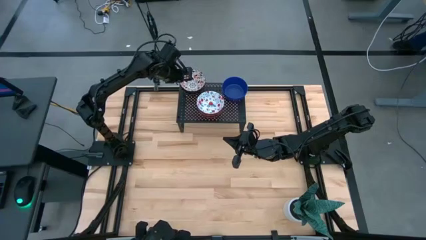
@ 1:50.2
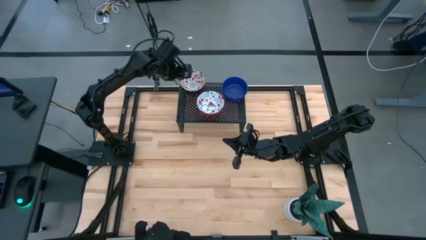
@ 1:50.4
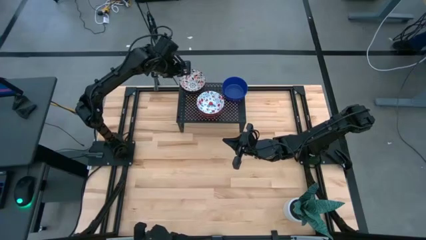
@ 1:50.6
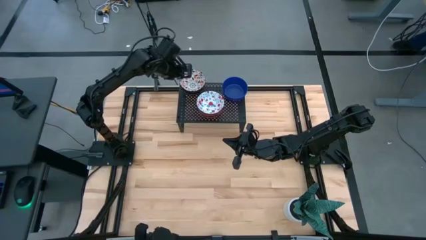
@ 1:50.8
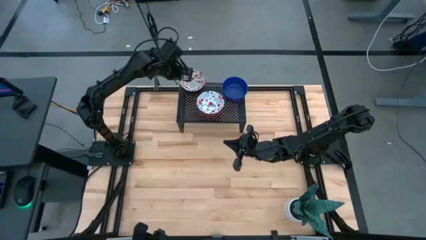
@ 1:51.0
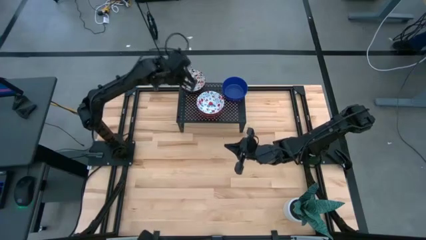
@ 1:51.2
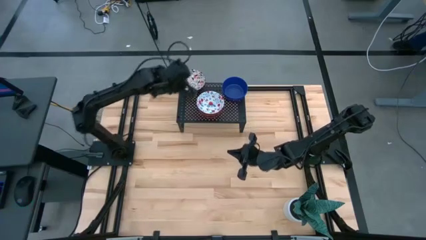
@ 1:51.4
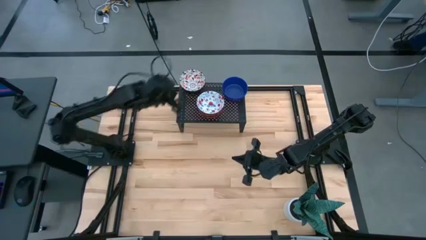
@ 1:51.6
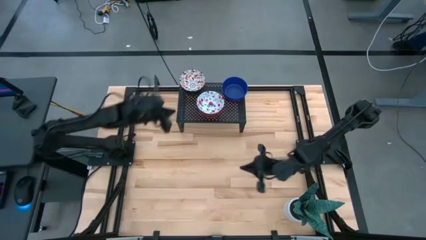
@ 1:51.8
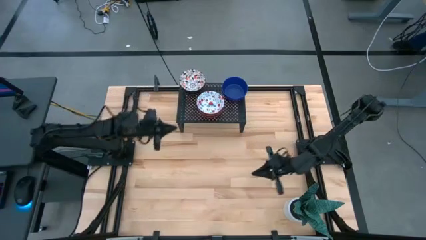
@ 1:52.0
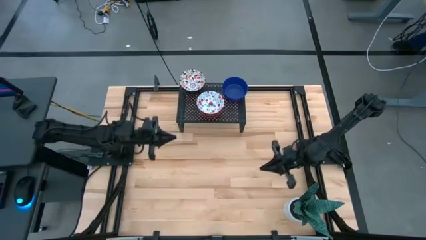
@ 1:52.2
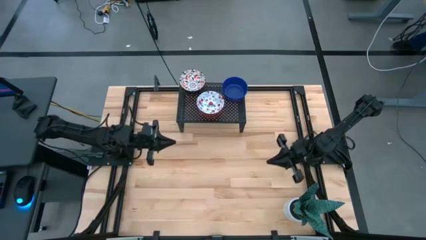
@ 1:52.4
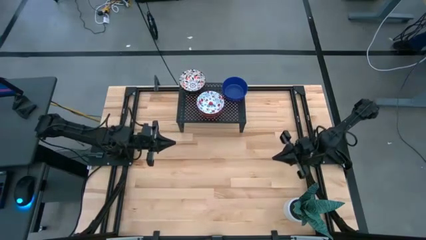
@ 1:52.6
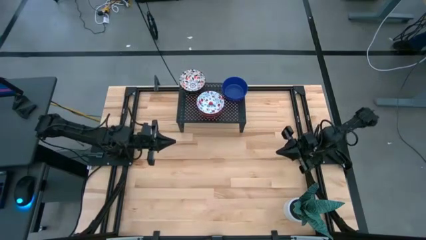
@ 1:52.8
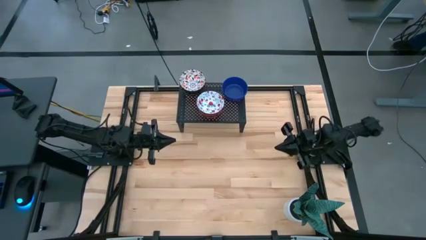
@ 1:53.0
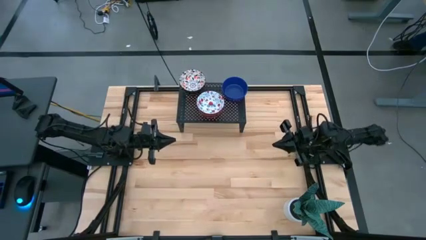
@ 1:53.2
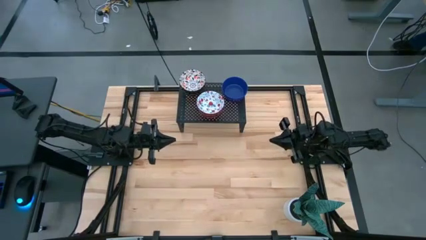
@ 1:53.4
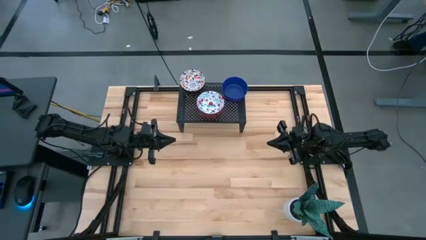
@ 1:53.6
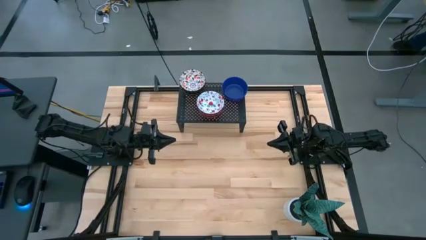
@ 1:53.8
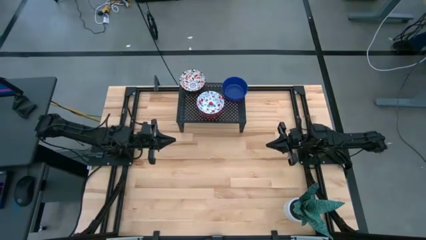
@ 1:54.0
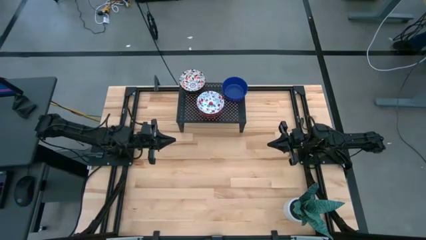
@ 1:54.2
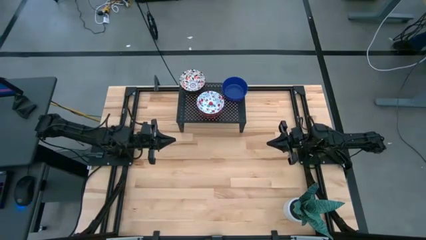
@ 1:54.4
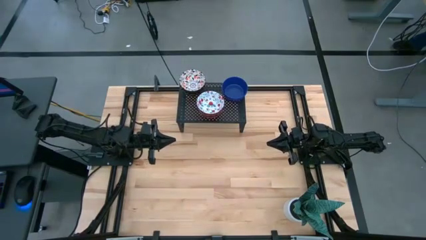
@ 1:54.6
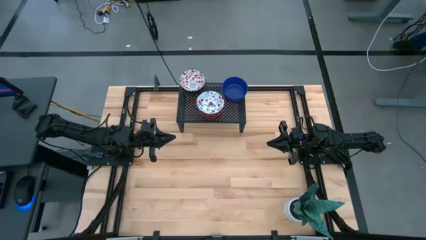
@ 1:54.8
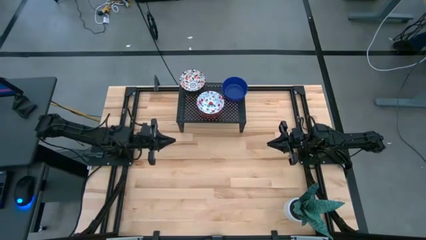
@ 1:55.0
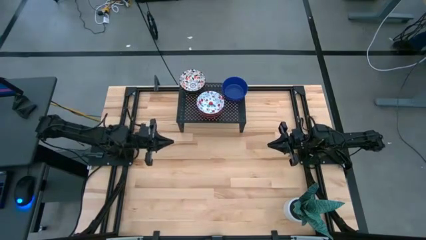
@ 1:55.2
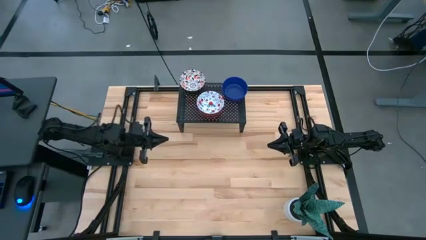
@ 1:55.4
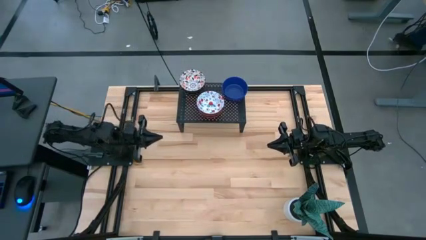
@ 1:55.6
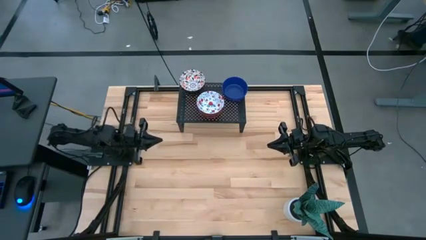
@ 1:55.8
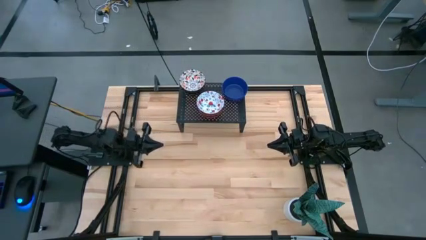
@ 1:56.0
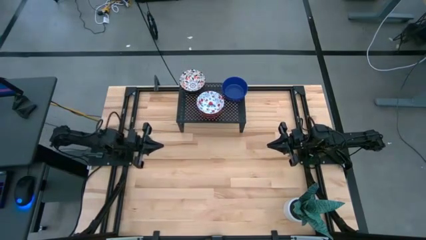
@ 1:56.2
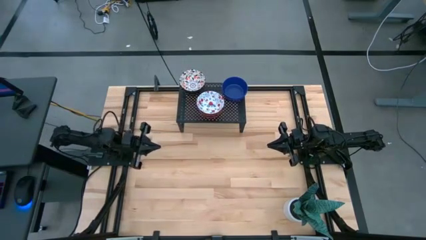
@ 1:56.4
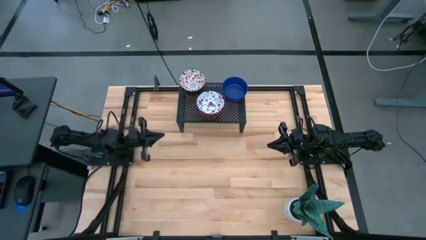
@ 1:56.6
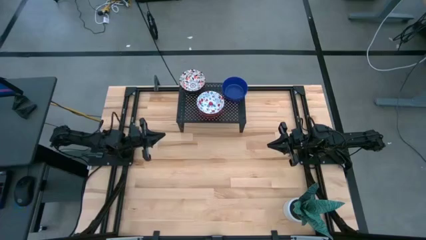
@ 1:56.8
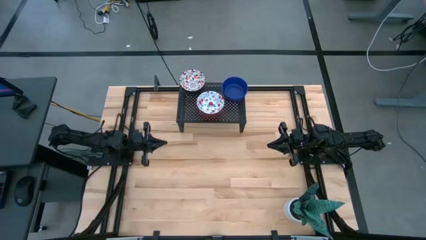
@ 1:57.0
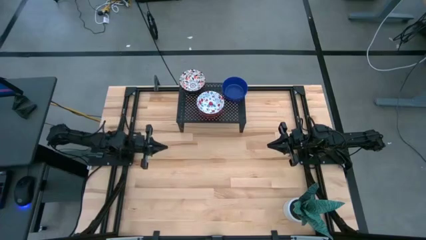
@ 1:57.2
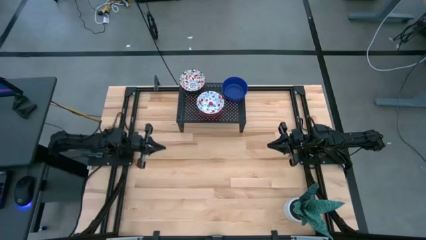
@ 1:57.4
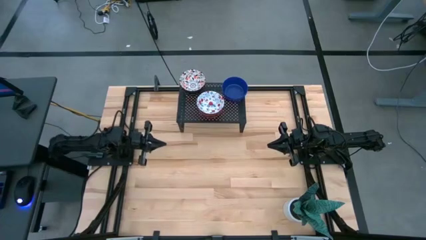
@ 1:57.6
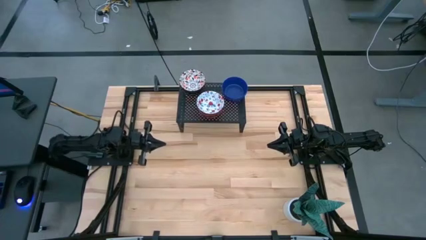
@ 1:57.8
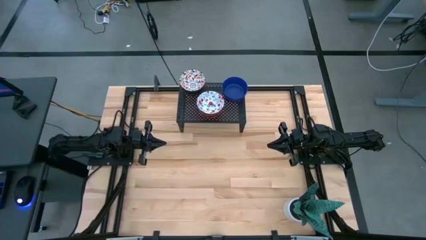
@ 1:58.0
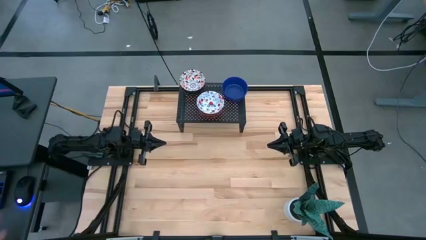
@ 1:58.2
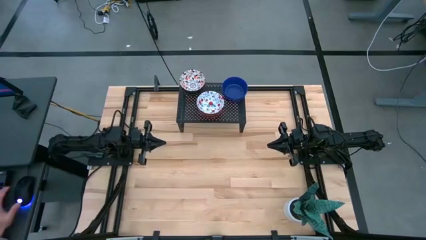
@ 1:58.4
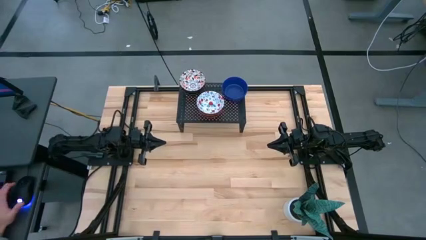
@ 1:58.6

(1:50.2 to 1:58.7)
Task: Pick & Place Mini bowls
Return to Home Position

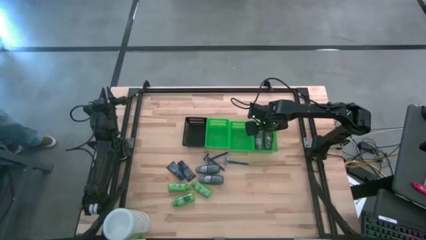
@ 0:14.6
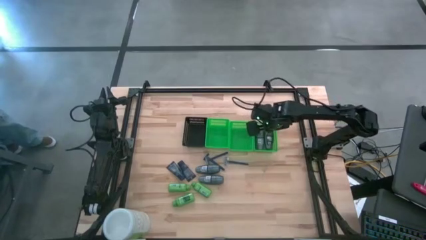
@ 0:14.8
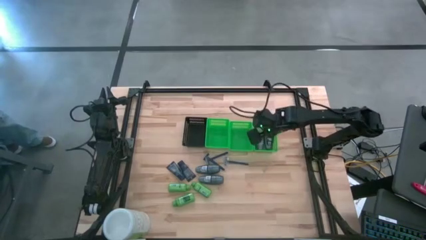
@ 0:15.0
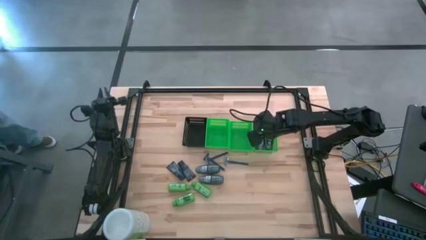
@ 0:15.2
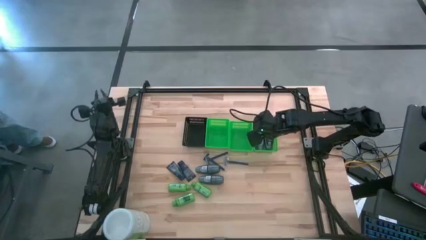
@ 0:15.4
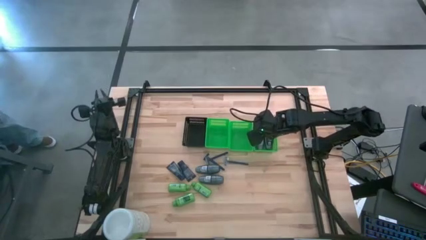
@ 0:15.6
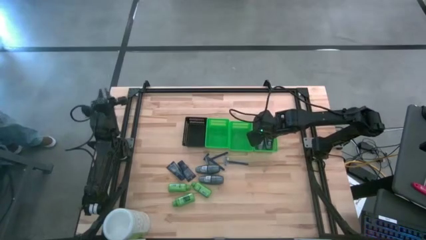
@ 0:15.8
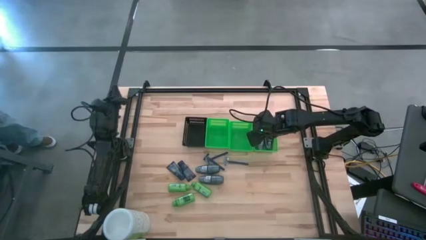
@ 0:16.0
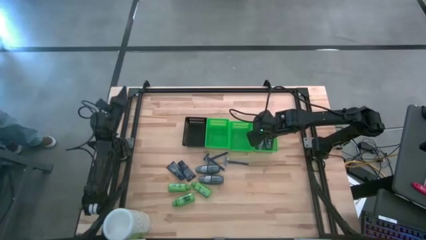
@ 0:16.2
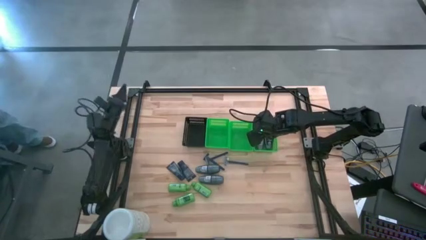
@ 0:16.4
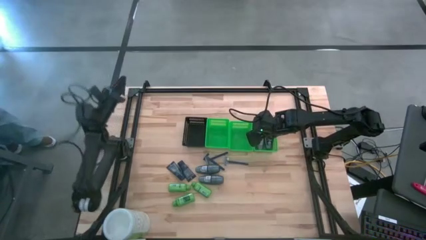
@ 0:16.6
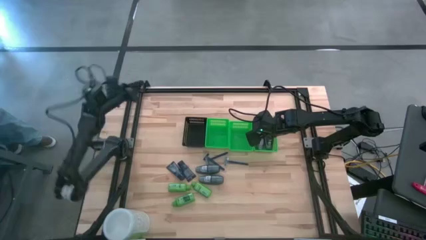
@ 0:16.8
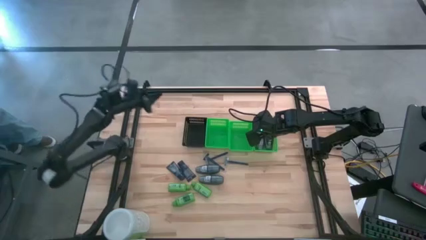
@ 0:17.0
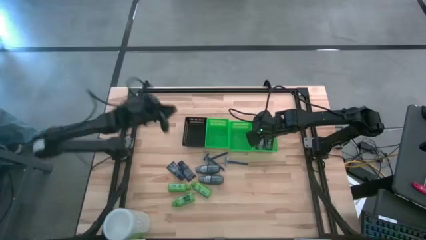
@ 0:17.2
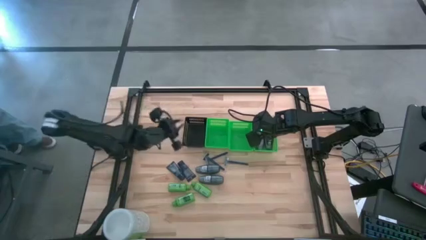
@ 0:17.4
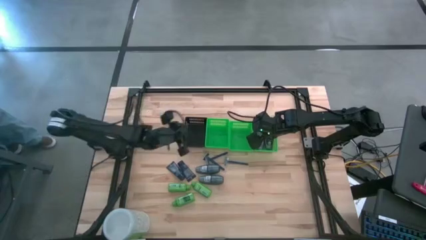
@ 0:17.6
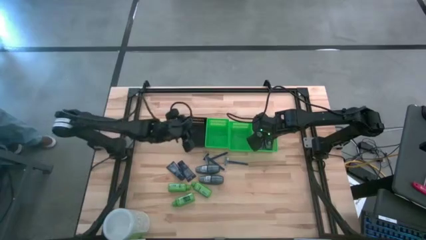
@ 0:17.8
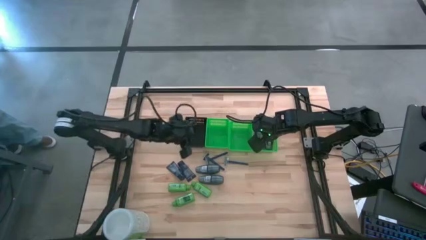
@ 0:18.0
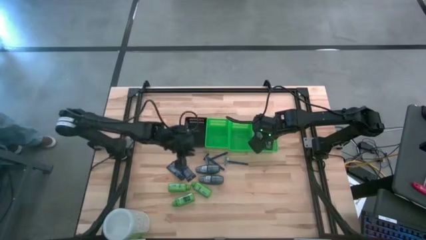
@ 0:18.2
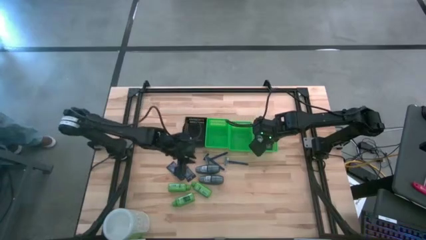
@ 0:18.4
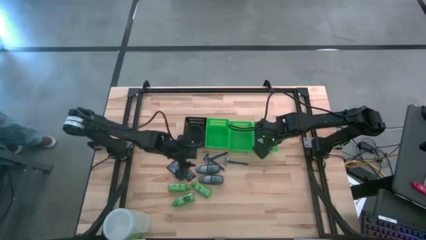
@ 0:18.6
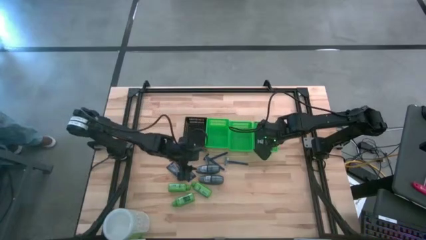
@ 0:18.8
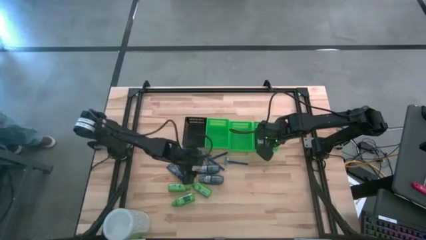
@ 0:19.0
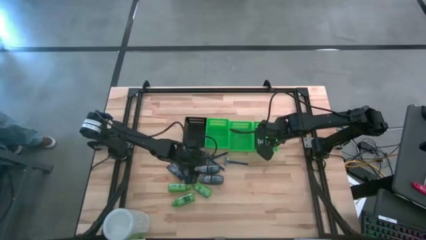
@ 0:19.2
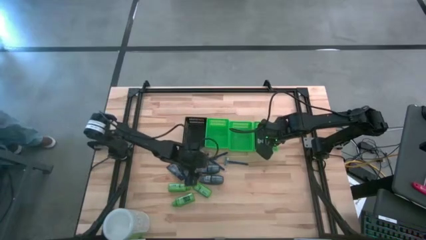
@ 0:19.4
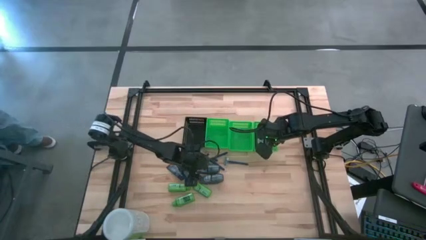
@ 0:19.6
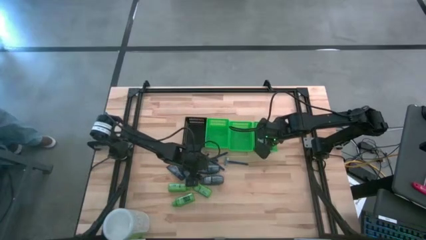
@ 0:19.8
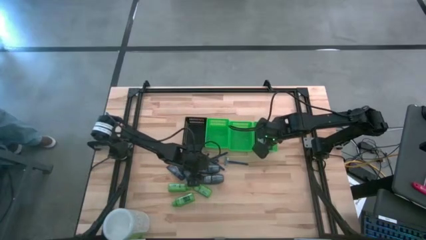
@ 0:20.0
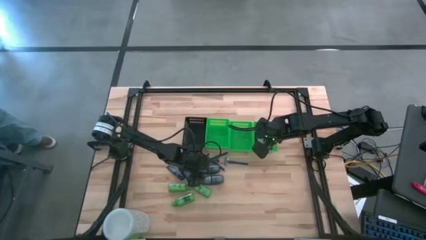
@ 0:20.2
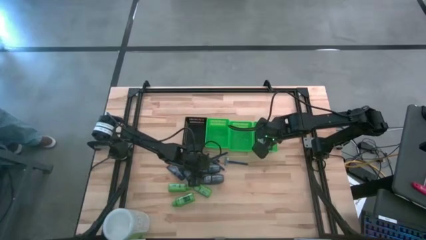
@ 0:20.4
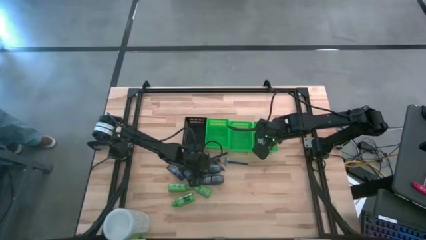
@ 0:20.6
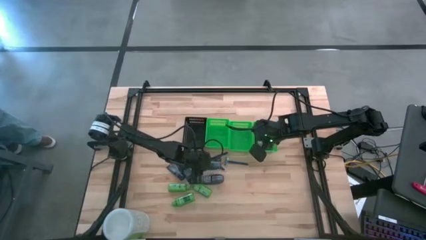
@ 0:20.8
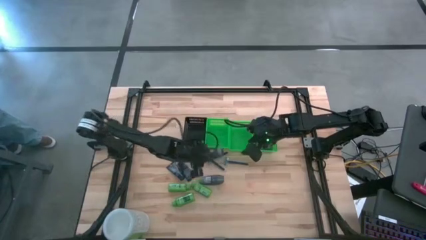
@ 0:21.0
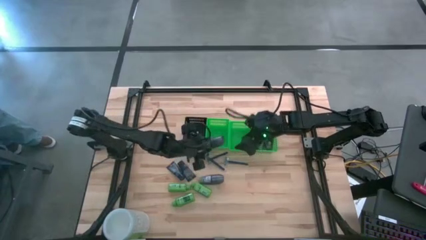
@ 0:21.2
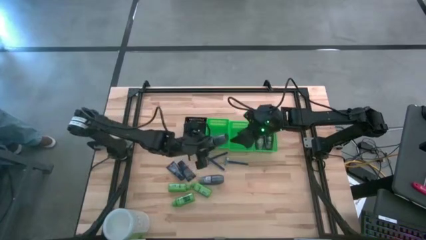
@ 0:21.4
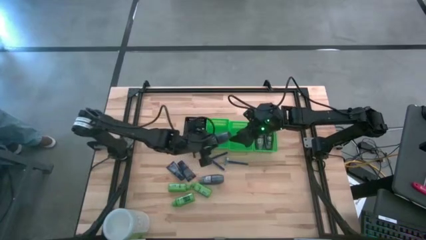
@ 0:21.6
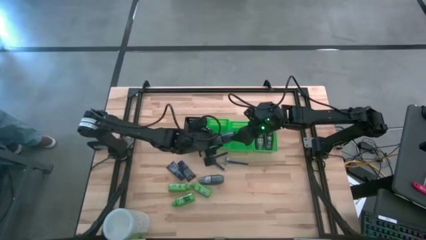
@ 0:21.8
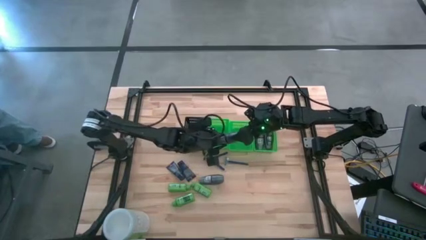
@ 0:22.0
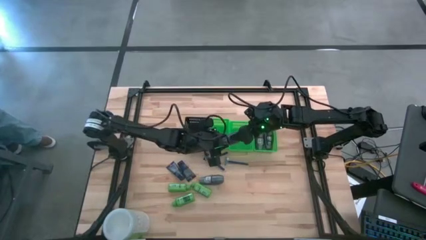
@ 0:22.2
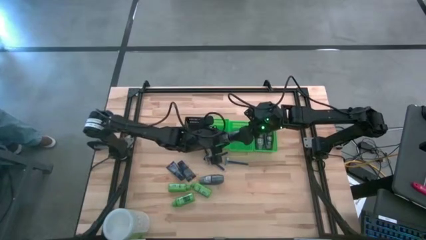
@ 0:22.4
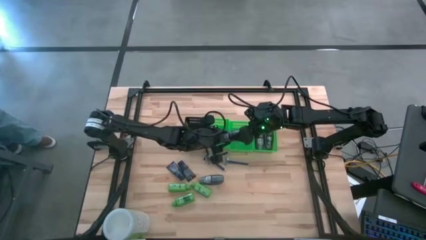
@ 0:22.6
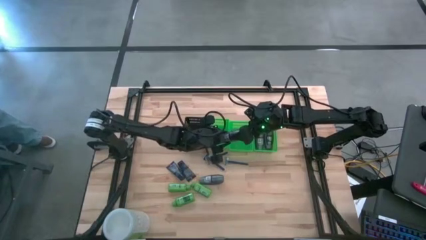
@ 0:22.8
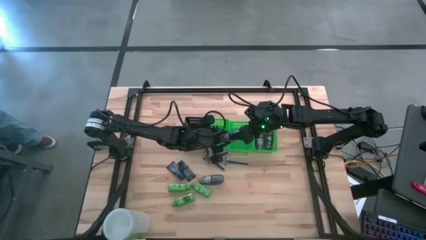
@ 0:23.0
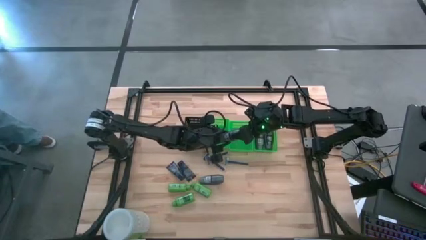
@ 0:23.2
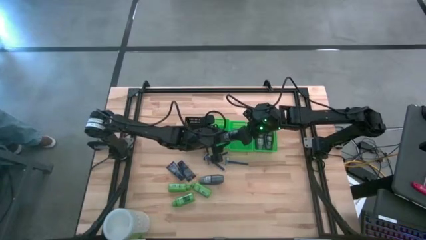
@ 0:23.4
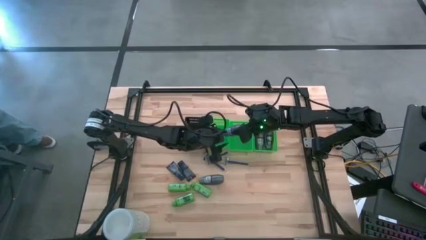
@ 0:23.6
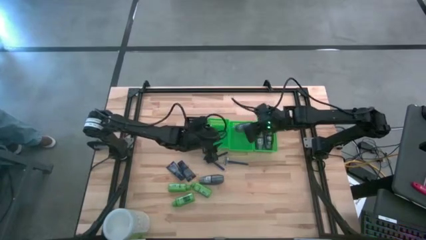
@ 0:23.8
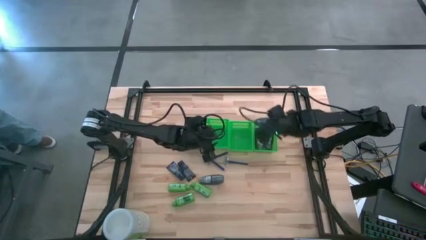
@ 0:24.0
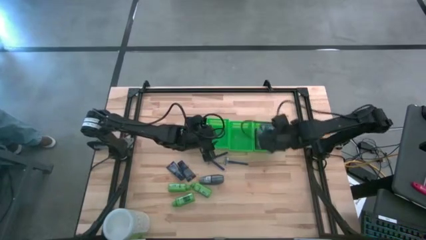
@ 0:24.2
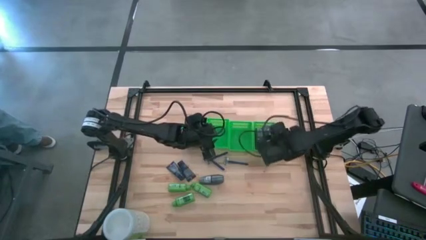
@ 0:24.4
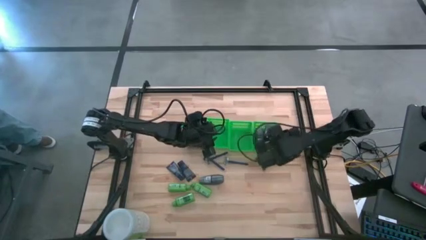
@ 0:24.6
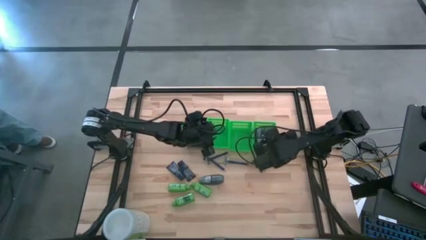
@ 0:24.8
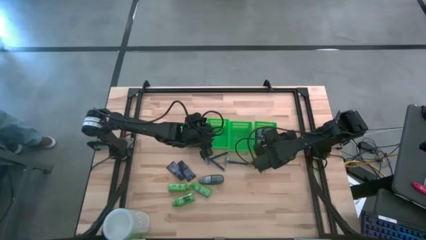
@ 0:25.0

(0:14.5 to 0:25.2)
Task: Pick & Place Travel size toiletries
Put the gray deodorant into the right green basket
